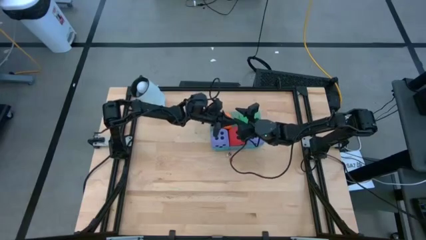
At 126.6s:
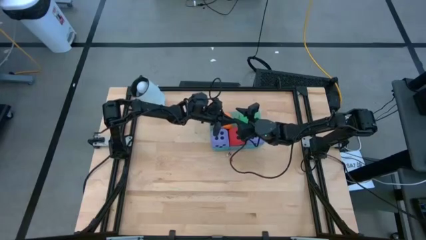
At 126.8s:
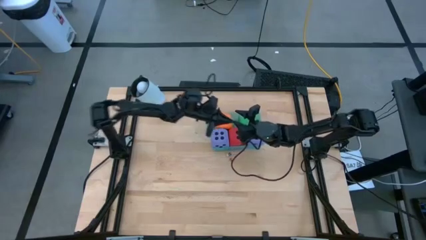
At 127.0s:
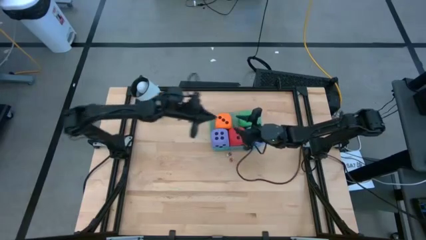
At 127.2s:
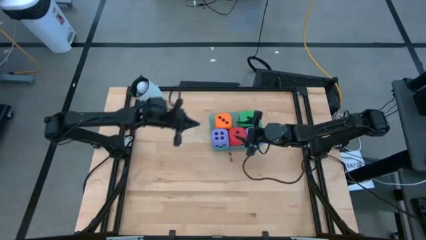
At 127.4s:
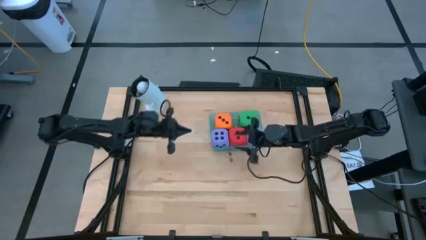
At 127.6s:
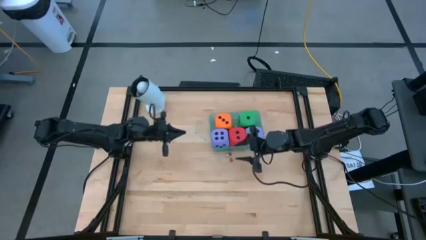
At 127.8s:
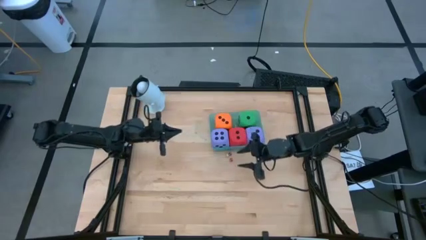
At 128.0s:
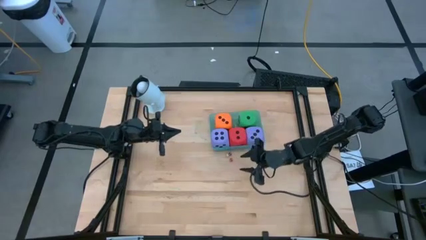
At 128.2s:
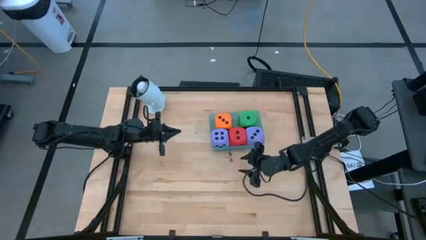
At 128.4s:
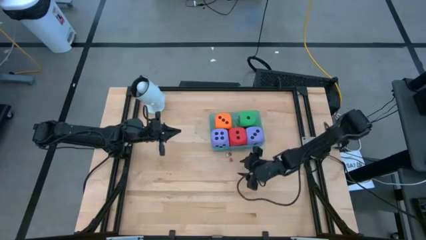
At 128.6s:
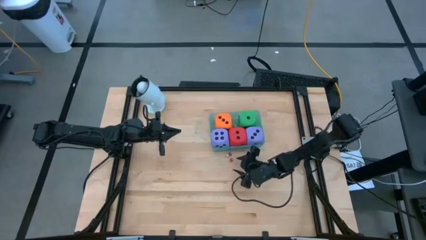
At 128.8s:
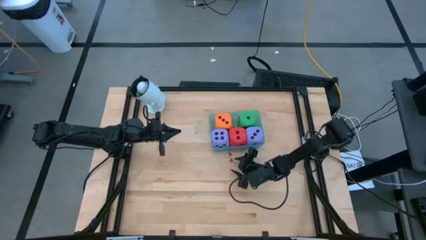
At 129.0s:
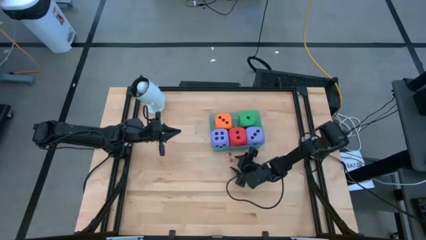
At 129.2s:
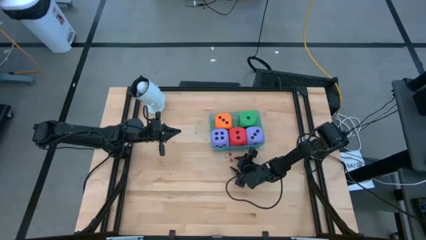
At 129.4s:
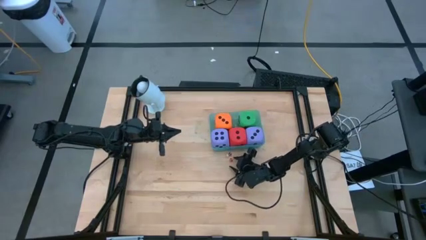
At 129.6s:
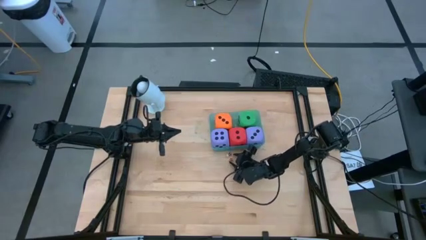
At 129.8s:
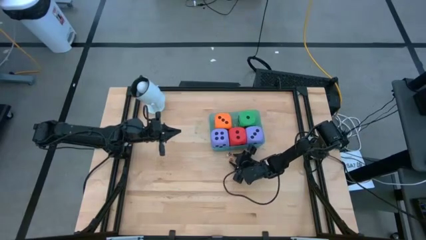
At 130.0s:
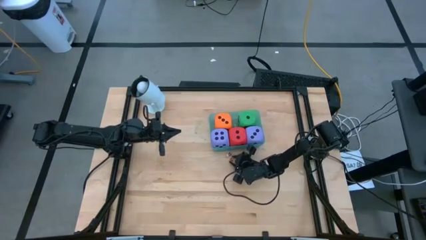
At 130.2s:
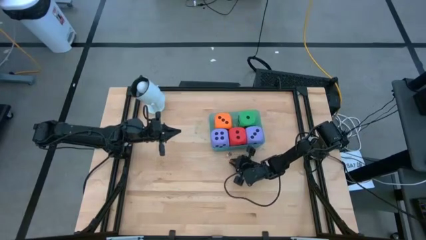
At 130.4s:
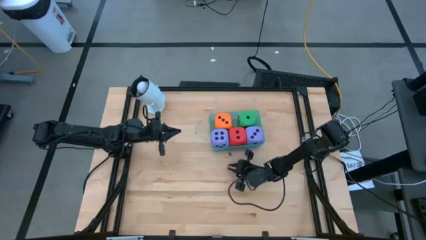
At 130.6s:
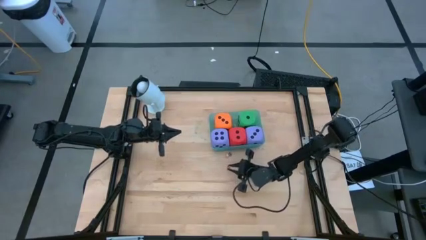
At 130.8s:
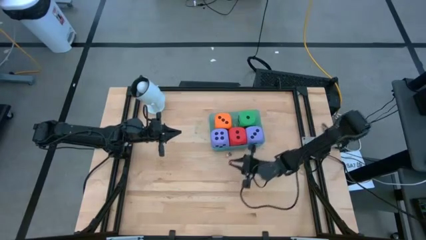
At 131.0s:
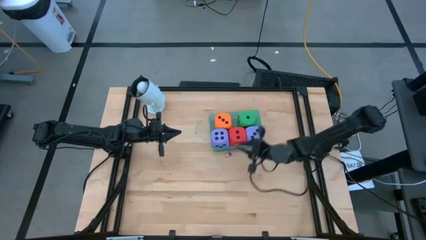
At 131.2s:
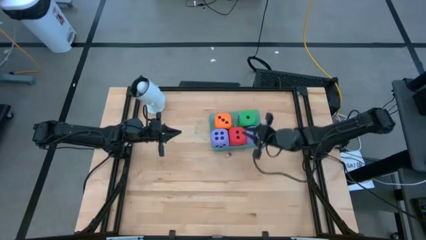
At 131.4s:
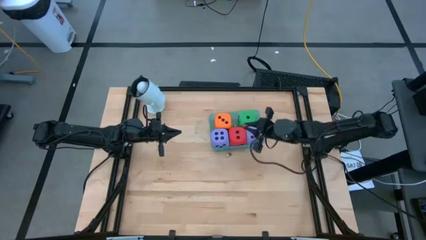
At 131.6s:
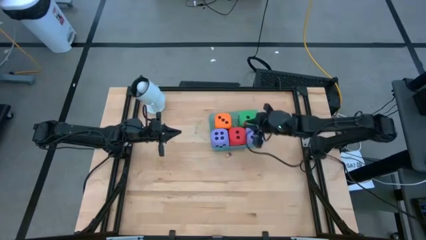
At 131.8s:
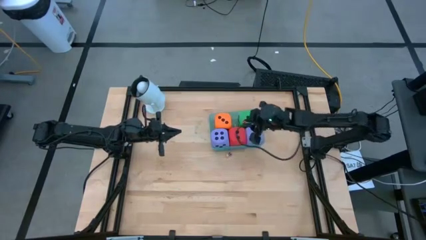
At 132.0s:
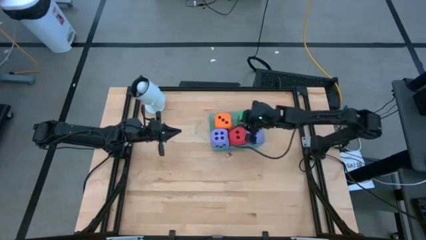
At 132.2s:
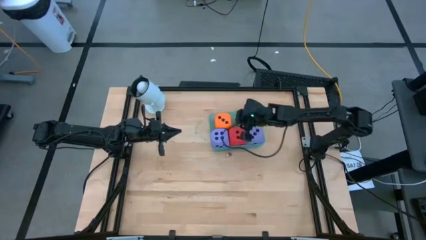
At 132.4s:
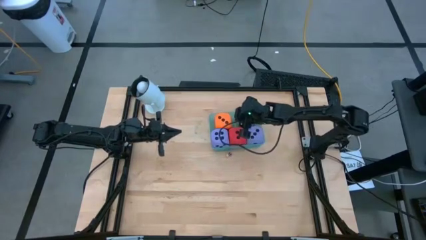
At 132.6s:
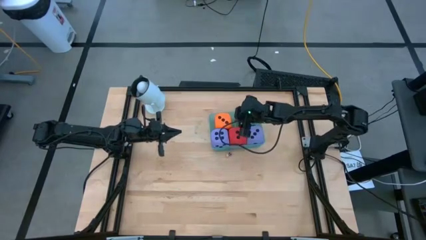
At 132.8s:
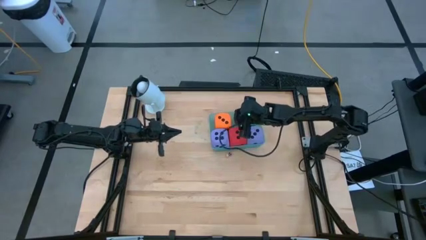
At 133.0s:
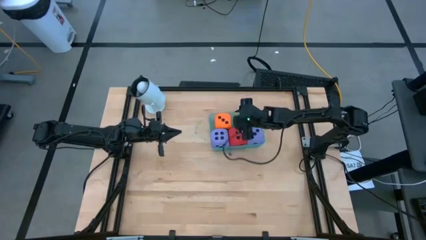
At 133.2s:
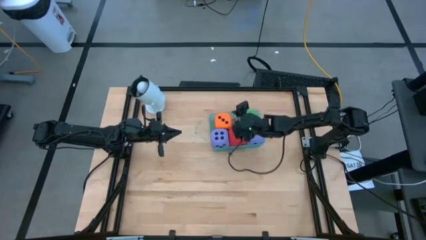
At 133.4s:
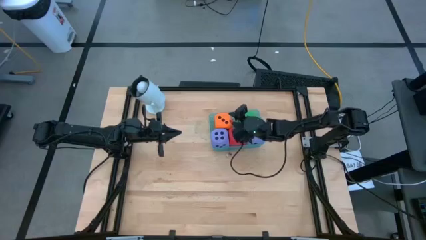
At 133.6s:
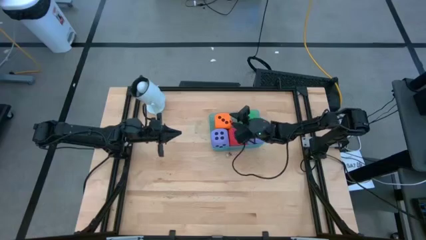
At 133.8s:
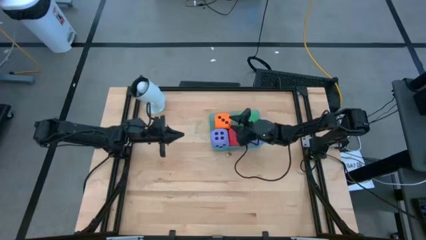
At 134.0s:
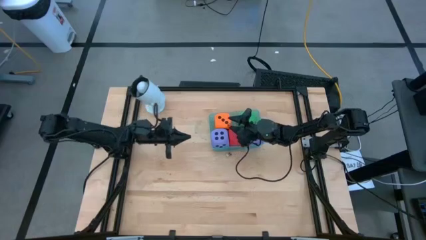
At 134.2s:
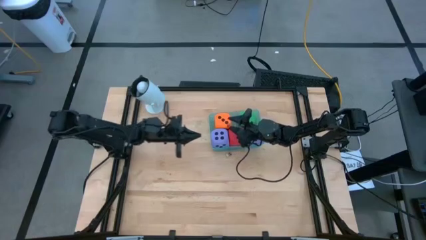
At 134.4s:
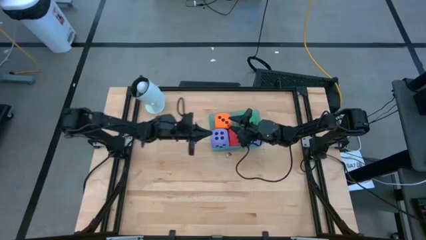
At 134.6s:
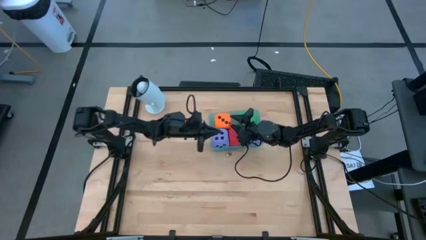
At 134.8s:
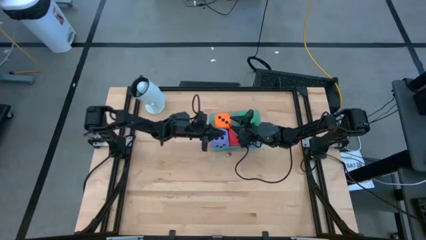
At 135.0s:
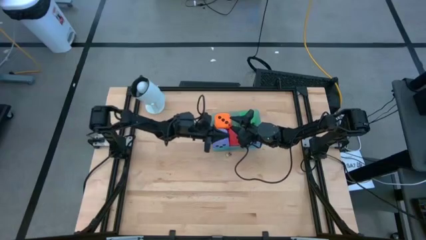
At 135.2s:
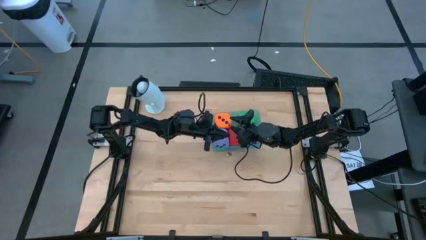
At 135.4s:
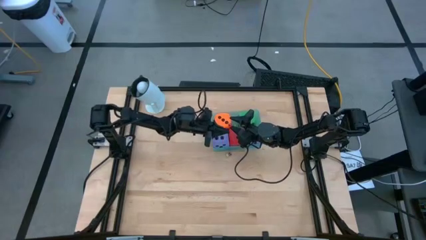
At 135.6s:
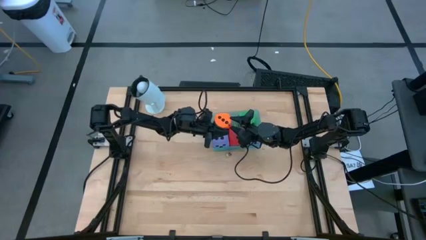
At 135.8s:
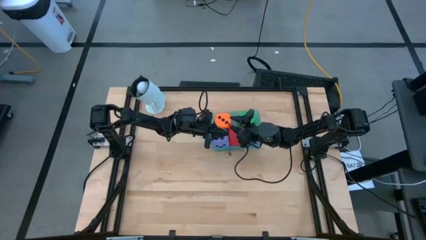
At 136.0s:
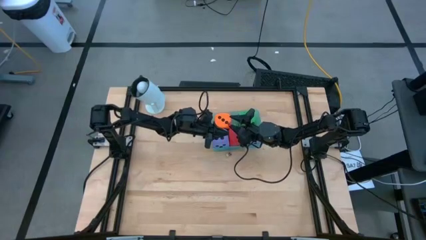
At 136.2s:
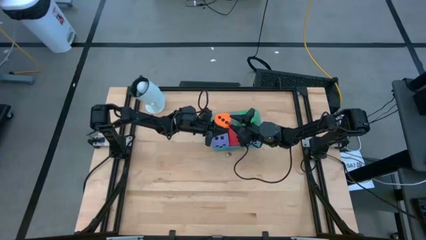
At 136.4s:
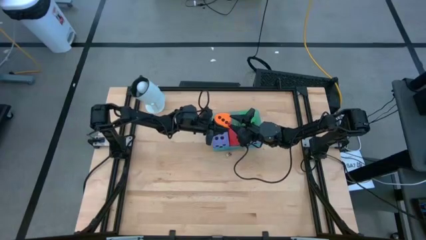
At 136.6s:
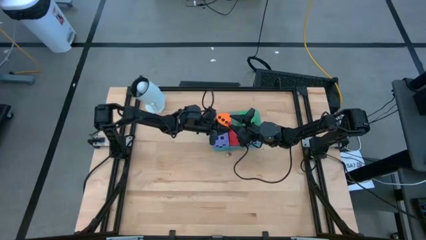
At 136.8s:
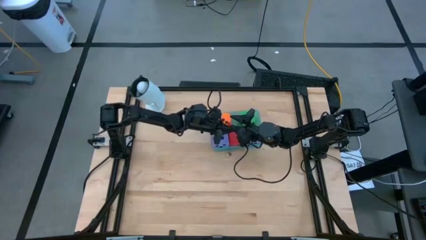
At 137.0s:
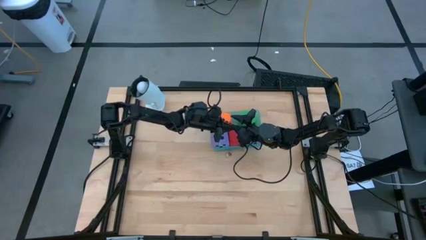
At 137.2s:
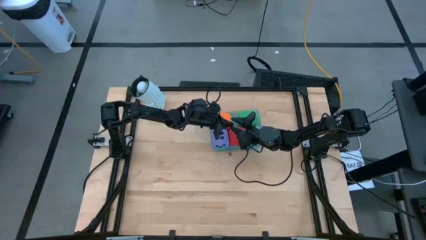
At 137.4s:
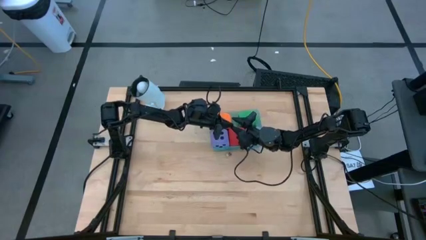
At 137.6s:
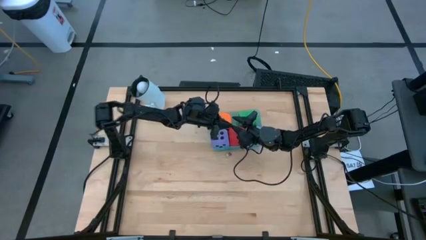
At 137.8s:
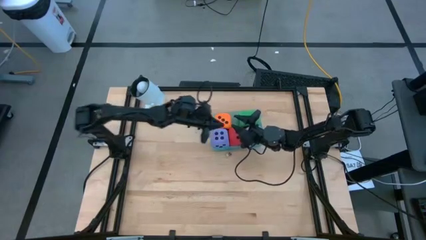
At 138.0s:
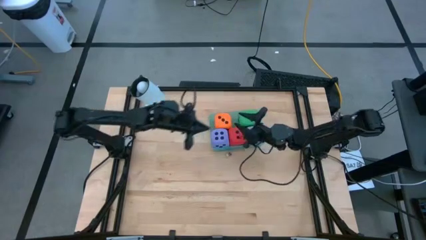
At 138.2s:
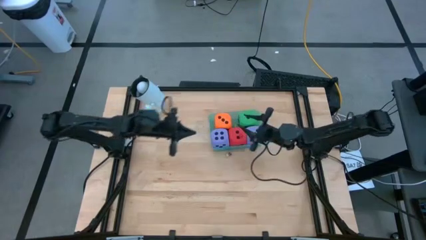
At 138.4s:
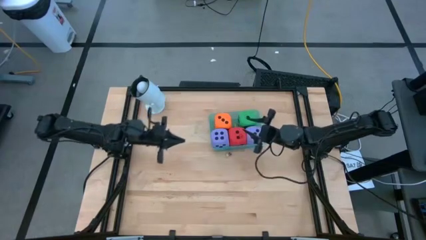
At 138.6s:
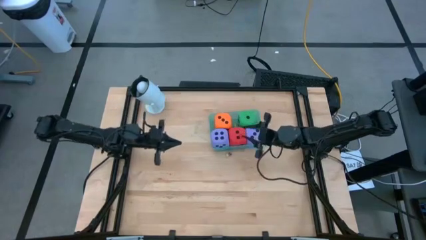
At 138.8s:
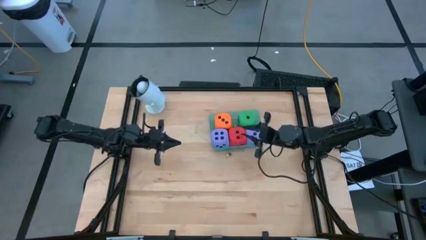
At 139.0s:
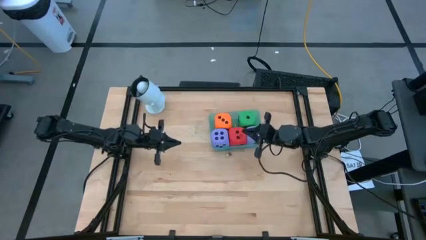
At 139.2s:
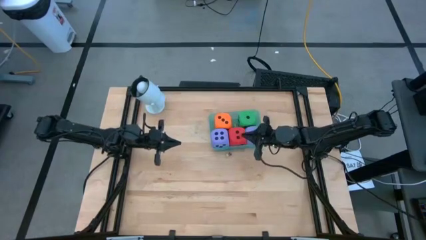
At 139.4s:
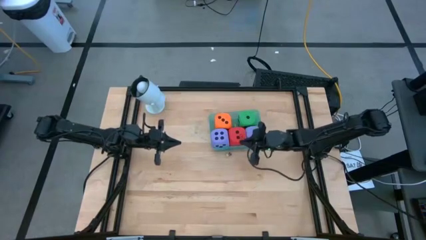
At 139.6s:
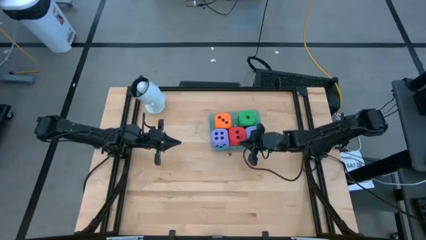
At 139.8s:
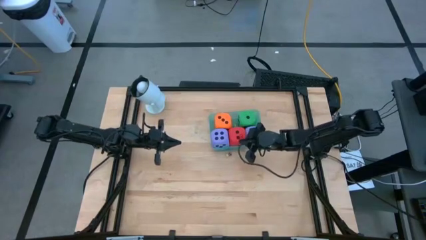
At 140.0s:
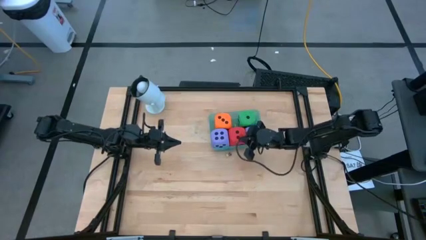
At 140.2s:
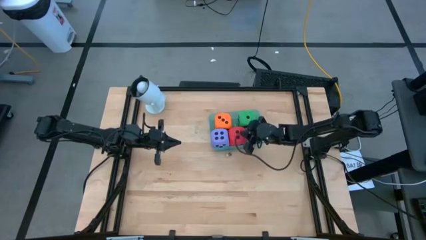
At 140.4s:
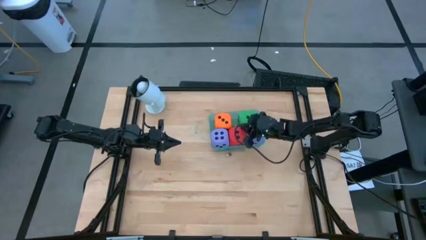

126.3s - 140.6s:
Task: Pick & Place Dice
Put the small red die into the blue bin

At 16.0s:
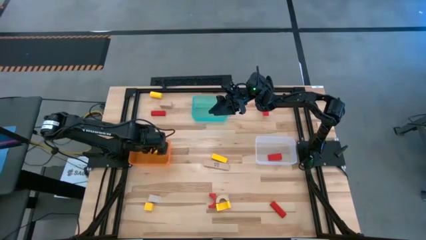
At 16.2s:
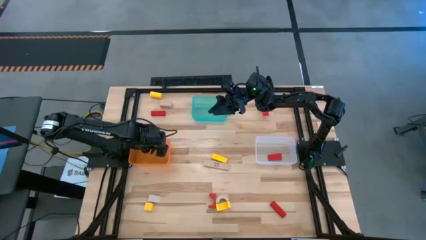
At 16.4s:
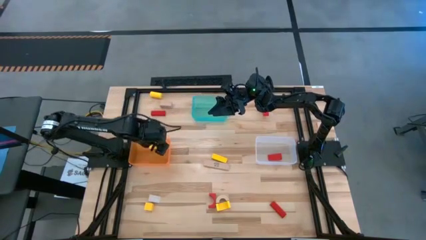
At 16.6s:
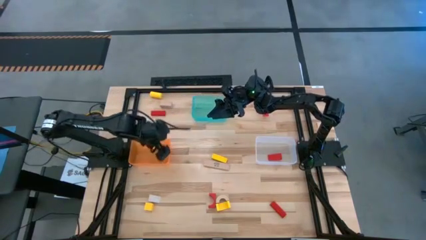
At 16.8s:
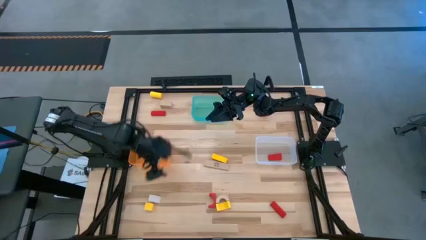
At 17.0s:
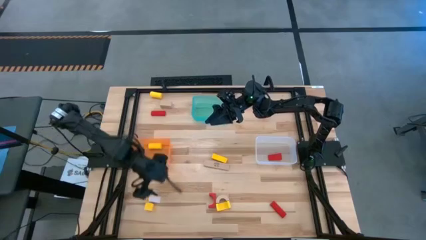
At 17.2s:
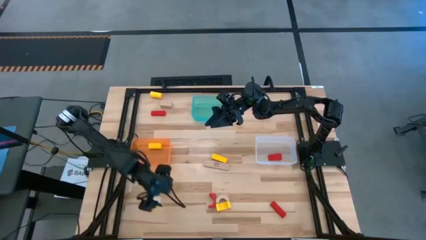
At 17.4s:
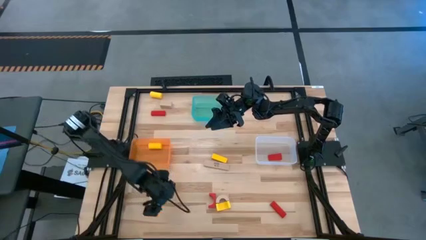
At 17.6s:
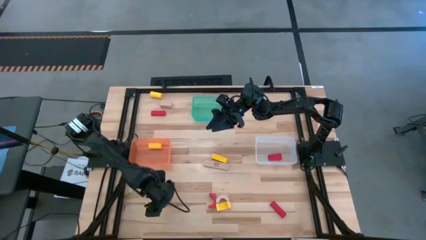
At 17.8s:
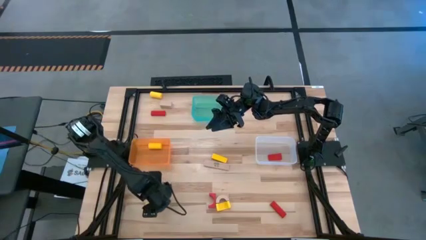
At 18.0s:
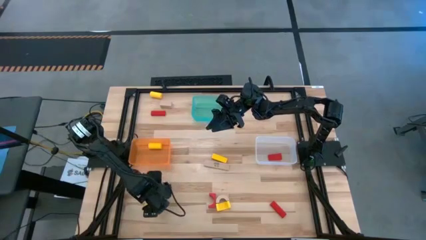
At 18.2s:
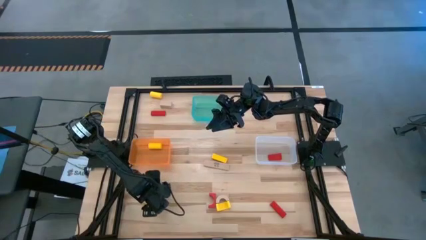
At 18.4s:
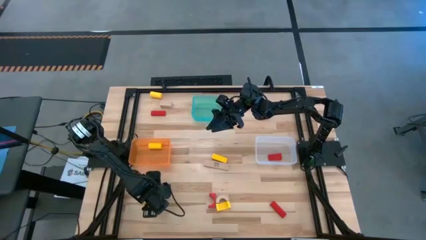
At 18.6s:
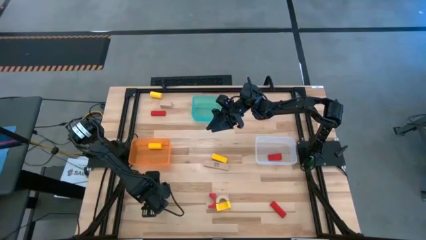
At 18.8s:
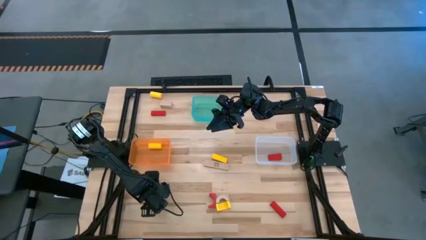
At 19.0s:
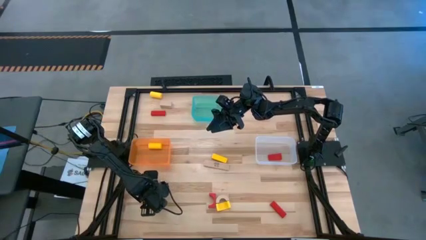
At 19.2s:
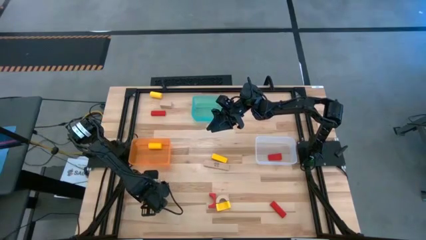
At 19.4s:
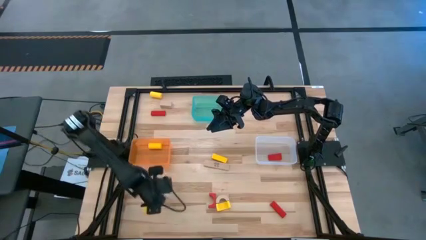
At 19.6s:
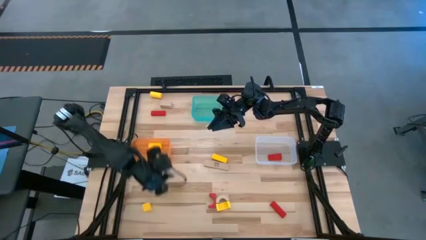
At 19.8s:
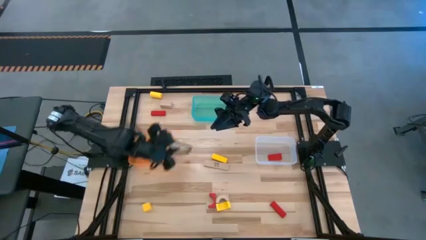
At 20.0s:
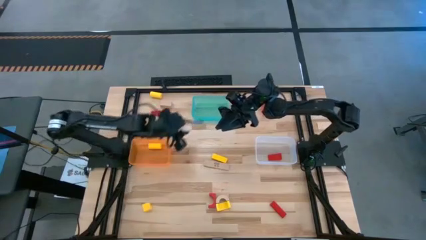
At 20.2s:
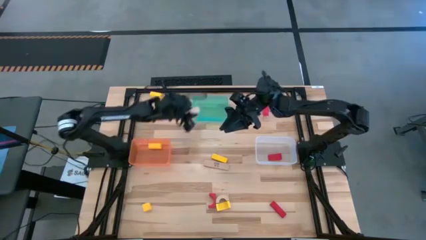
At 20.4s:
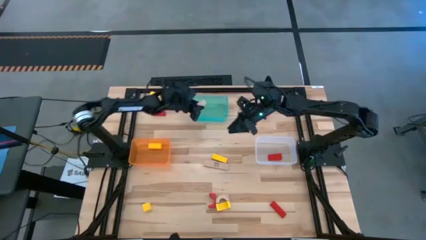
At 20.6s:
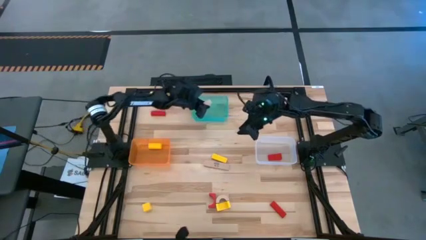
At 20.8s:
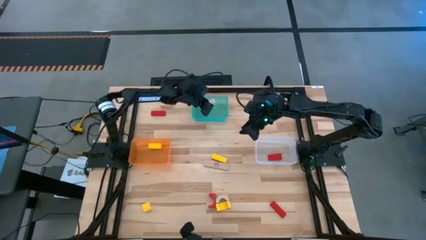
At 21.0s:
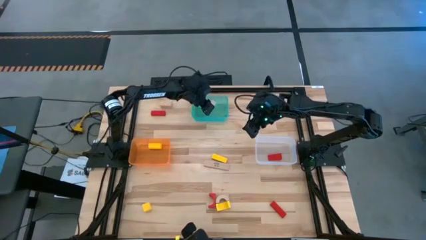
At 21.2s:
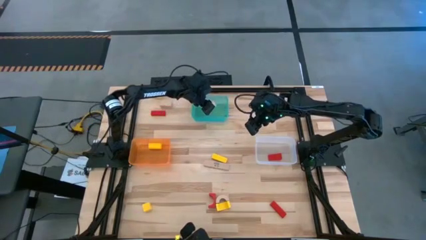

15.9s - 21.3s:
Task: Sort & place blocks by color
Put the brown block into the green bin
